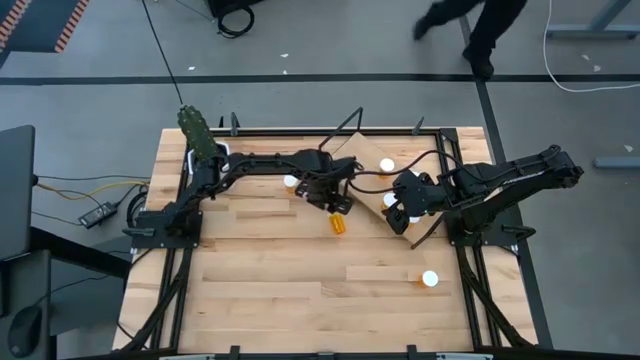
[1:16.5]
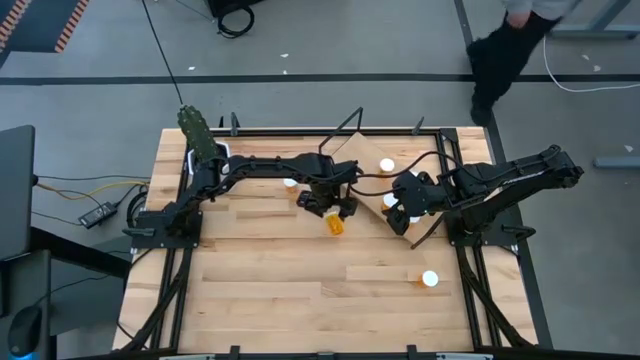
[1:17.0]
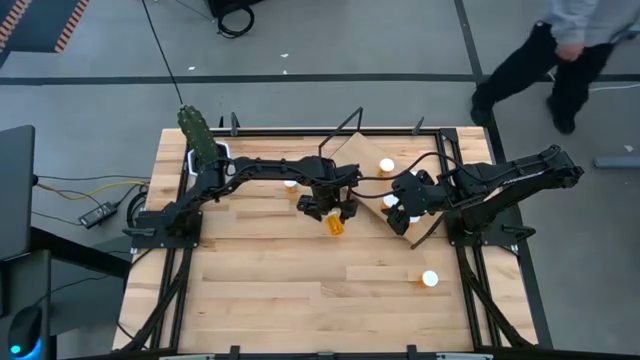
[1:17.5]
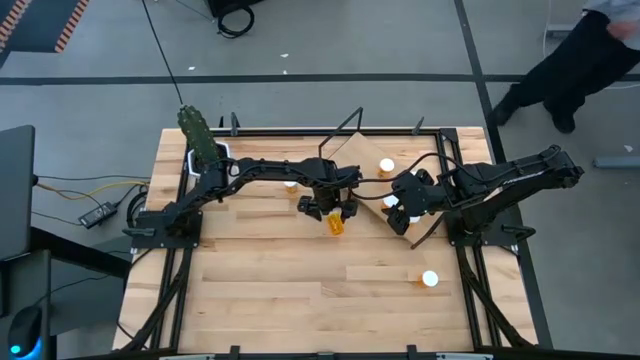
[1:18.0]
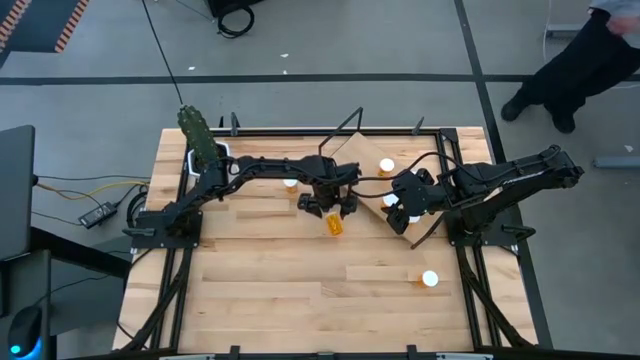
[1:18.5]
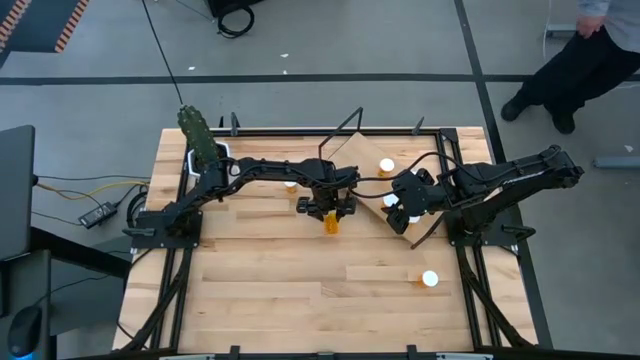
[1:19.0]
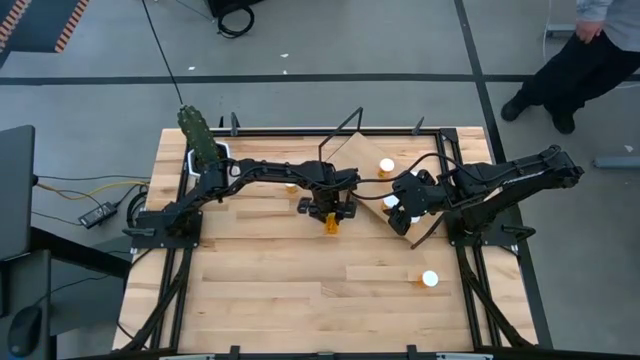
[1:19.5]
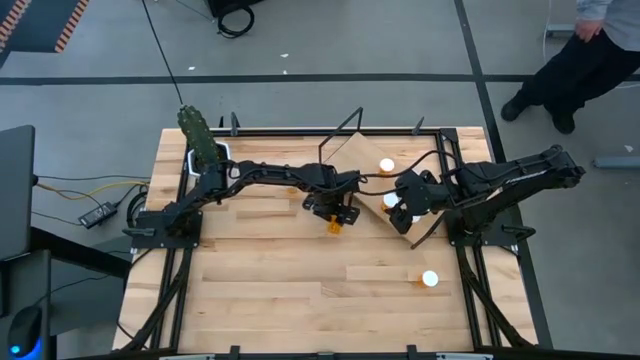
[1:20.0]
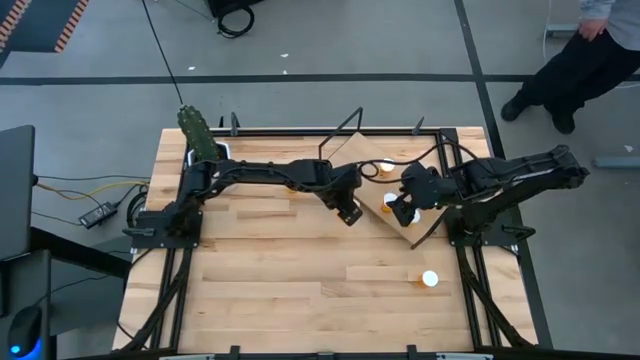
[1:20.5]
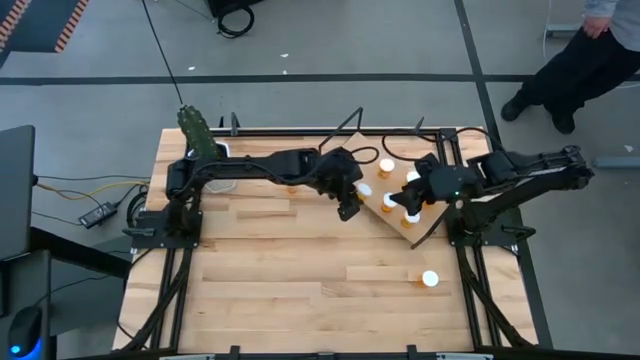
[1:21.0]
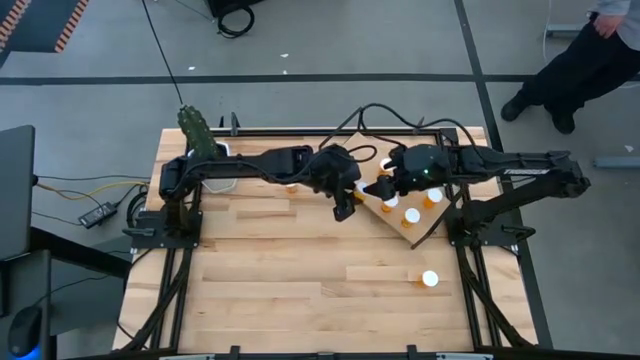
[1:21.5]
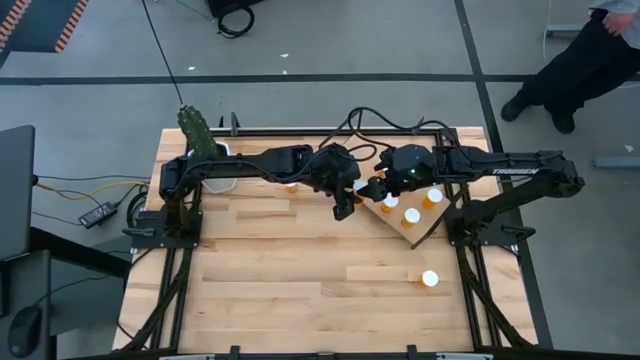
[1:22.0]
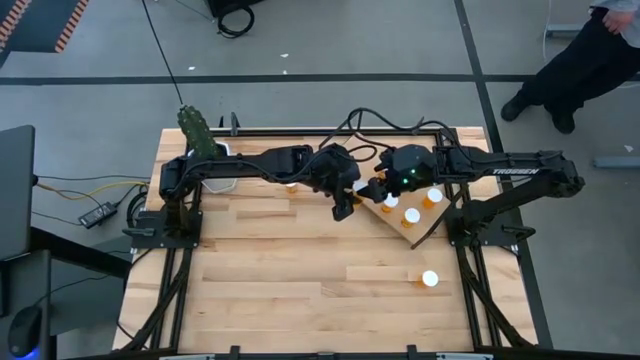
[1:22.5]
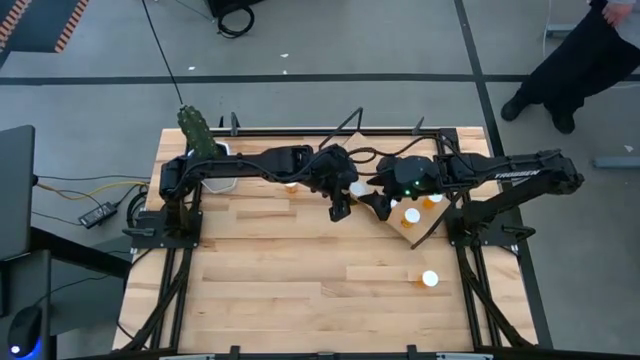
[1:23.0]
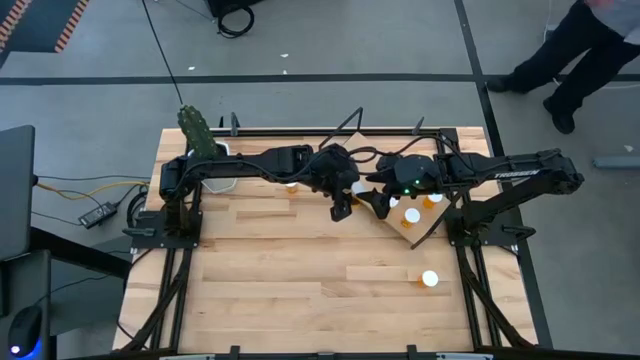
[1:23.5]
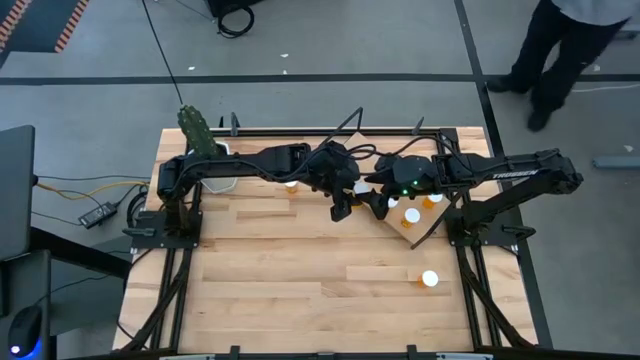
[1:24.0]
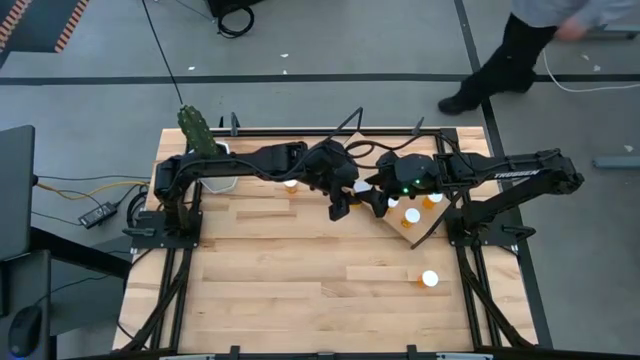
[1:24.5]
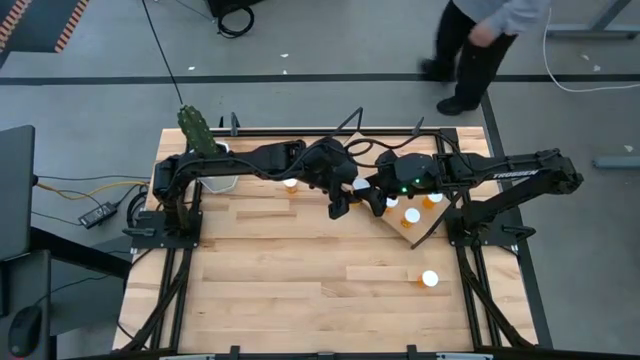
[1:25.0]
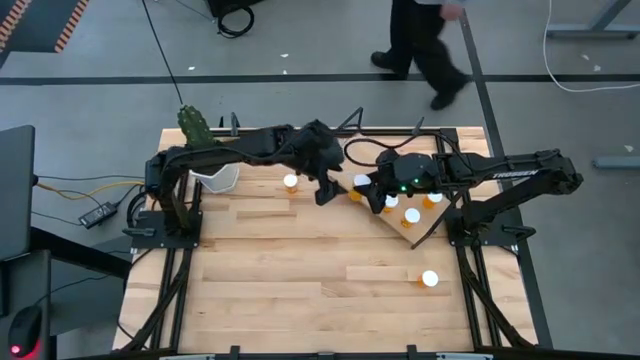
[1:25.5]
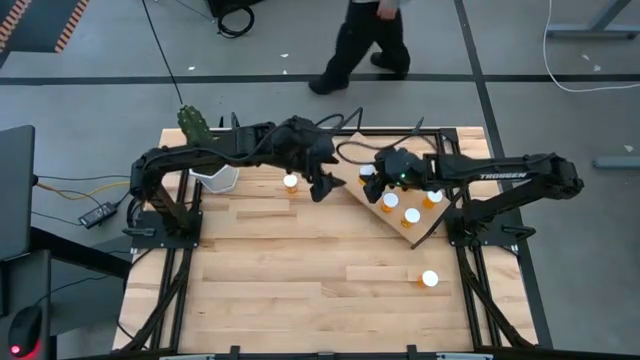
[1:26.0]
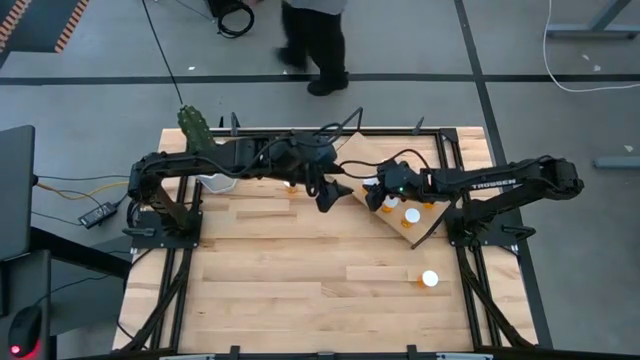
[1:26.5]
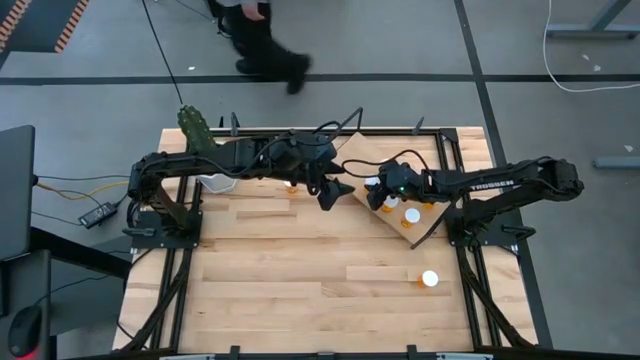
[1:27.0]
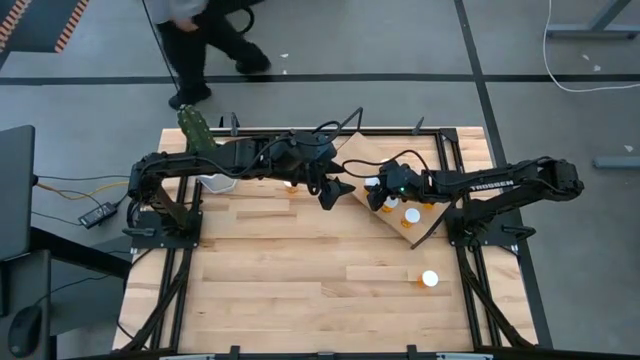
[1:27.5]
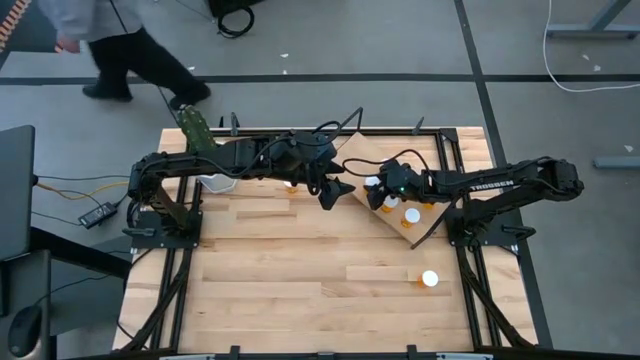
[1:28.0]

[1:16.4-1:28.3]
Task: Pick and place medicine bottles onto shelf by color
Put the orange pill bottle on the shelf aligned with the middle left orange pill bottle

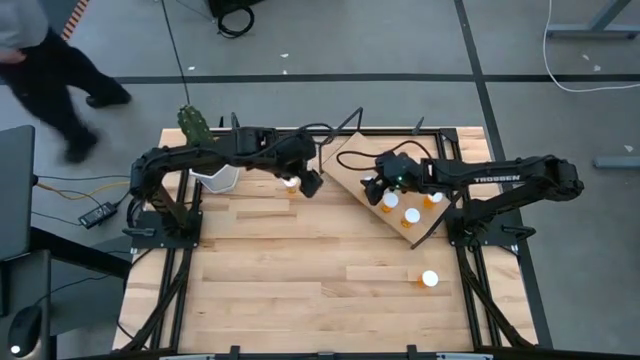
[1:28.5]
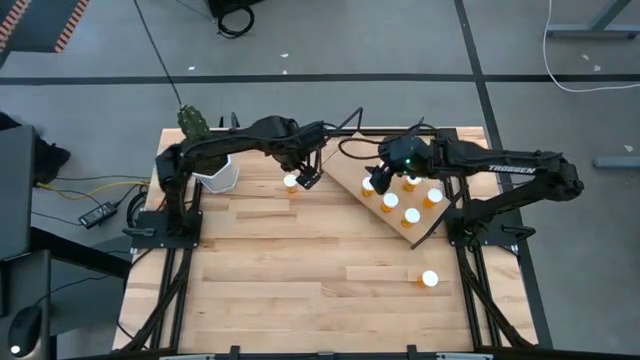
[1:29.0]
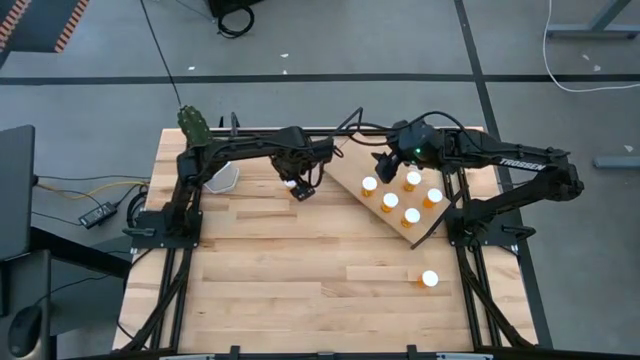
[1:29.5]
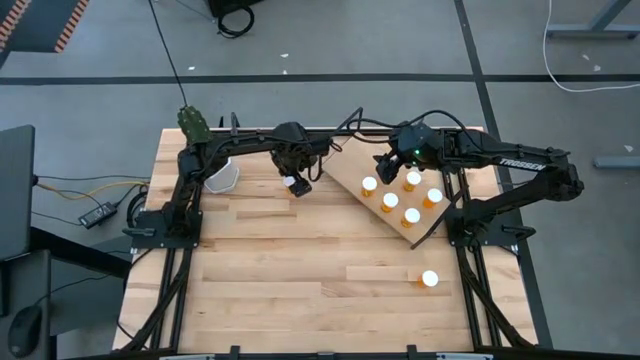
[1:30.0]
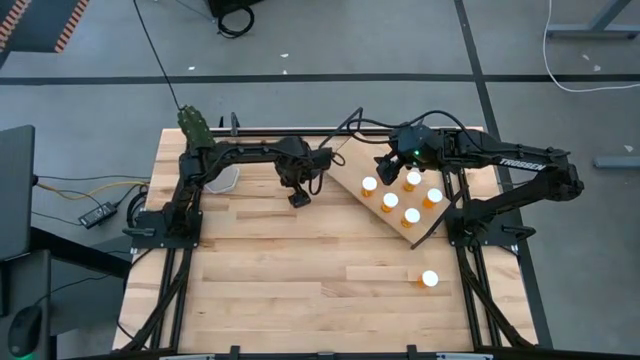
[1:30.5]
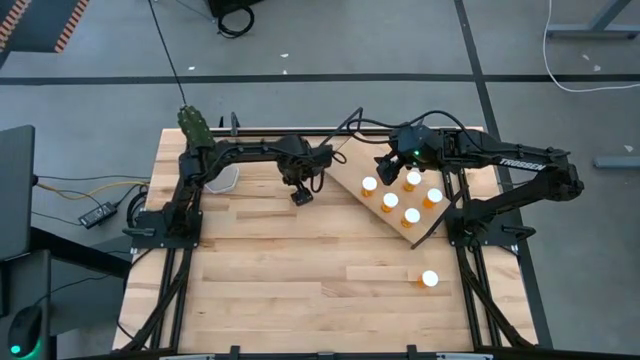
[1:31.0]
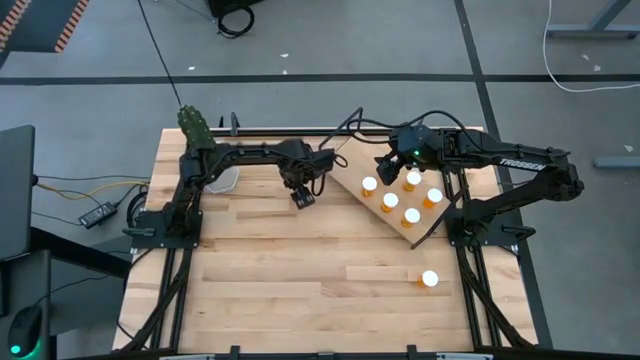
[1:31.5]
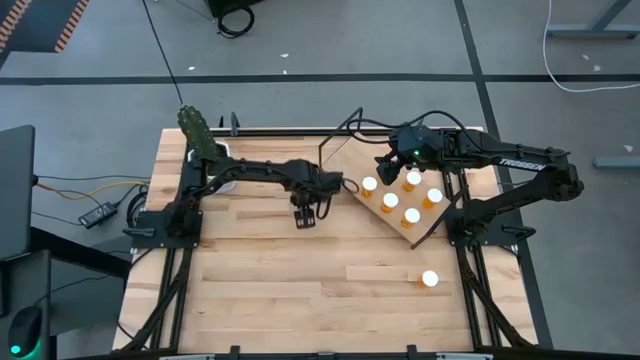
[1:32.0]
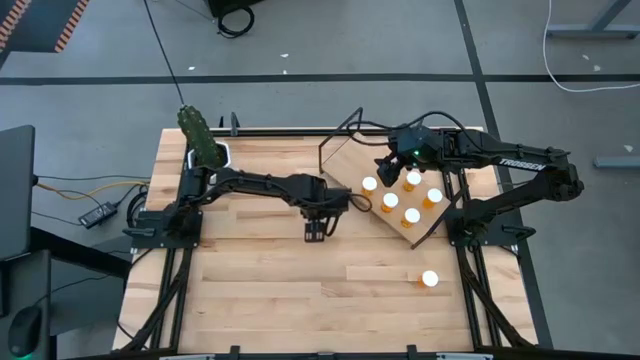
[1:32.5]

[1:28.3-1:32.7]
Put the orange pill bottle to the left on the shelf

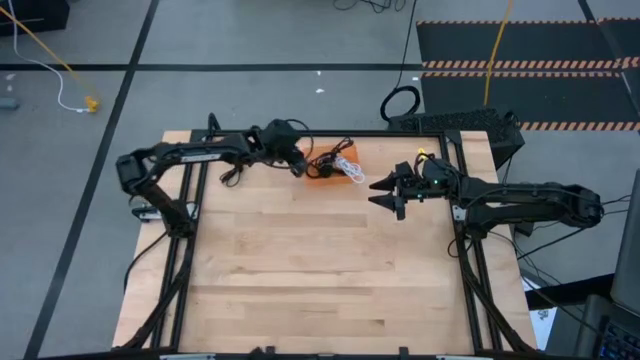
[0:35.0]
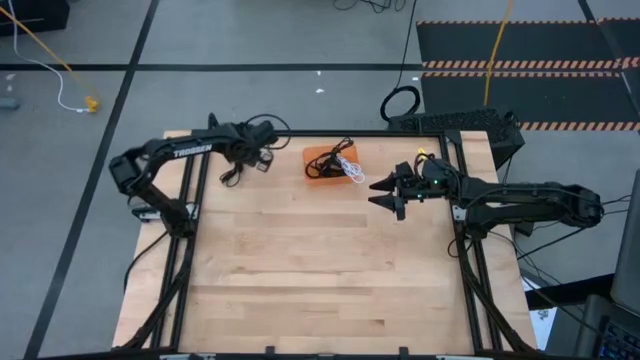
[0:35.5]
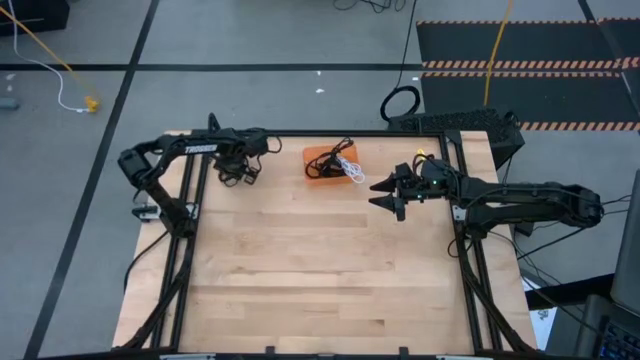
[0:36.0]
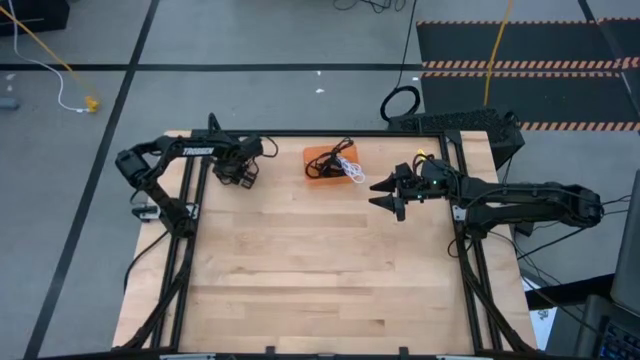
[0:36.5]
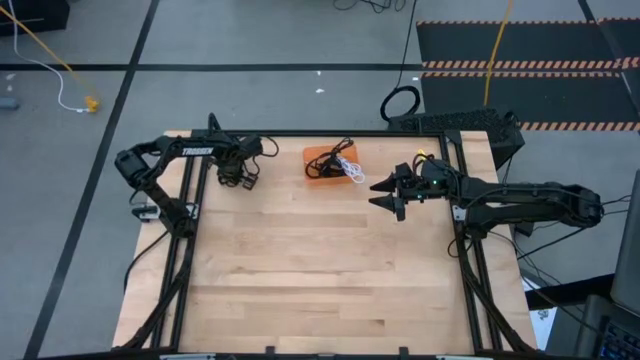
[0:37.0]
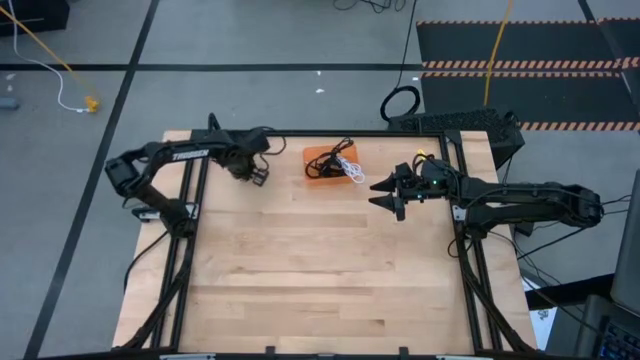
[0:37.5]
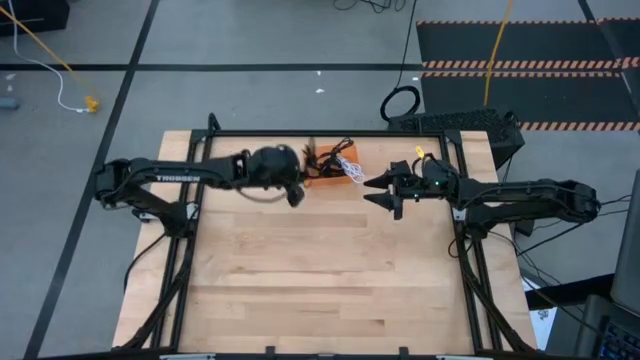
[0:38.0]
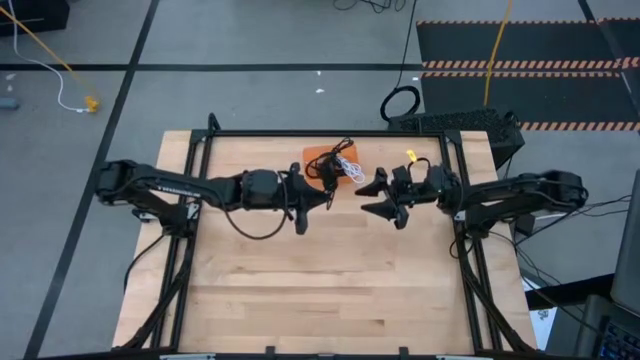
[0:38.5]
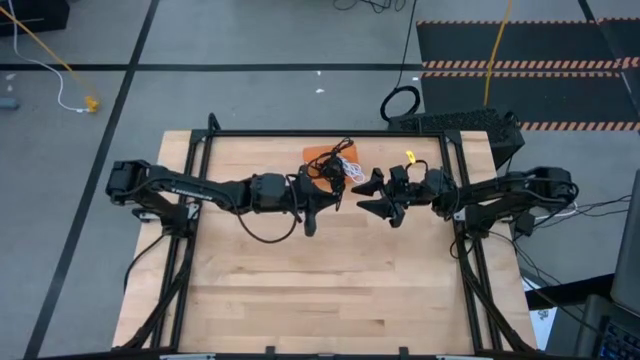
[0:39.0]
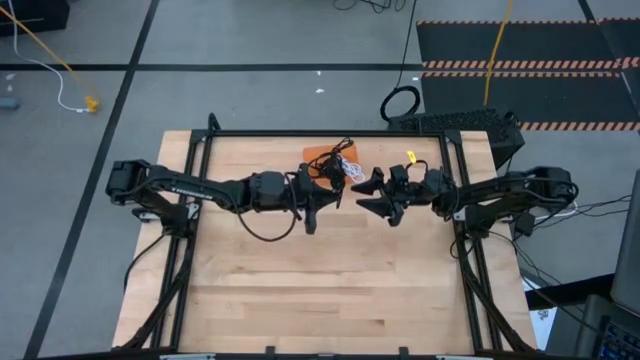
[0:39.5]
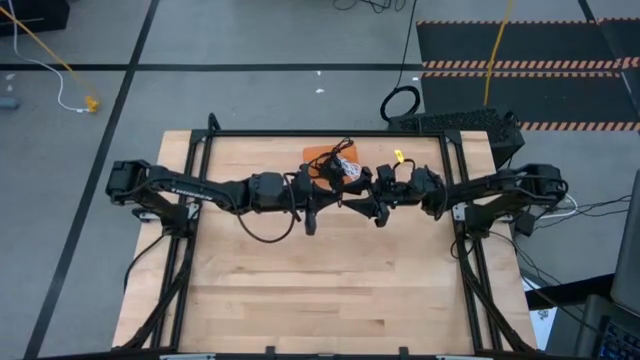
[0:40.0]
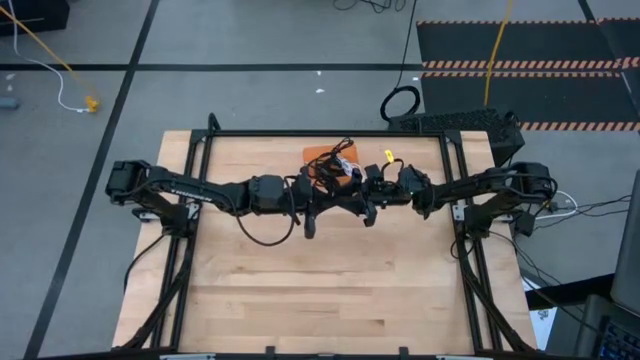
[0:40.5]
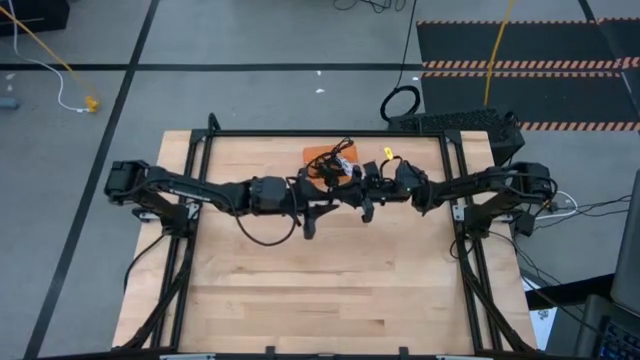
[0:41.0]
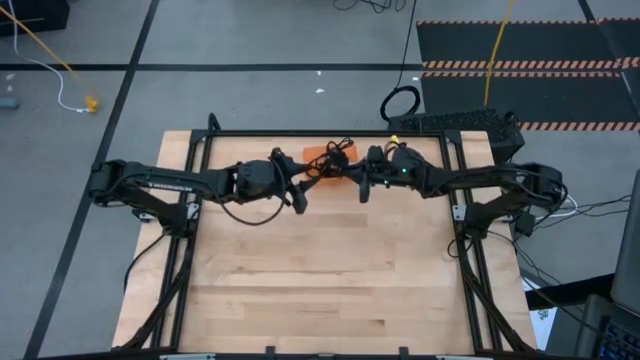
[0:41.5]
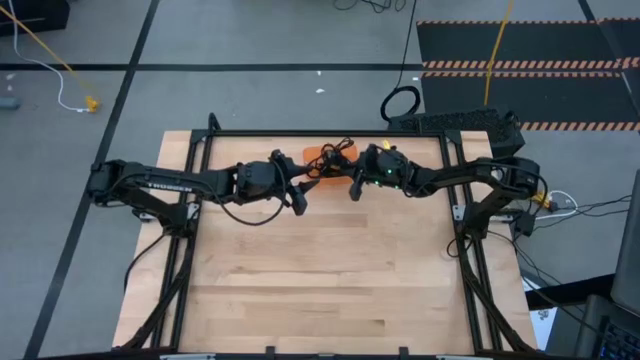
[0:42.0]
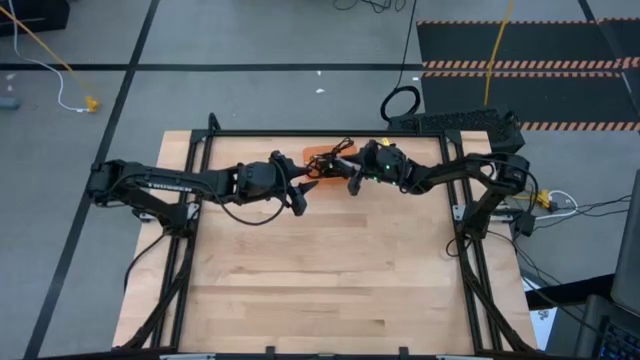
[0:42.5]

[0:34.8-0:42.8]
Task: Pick and place USB-C Cables
Put the black charger cable into the orange bin
